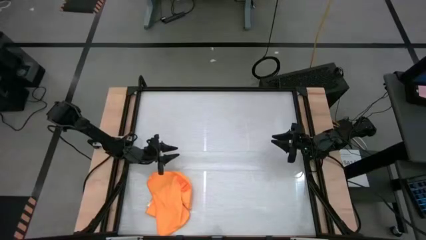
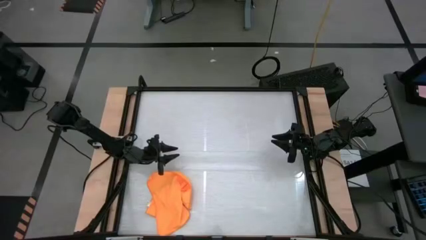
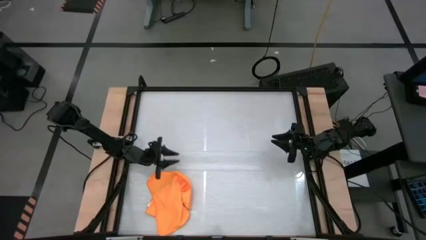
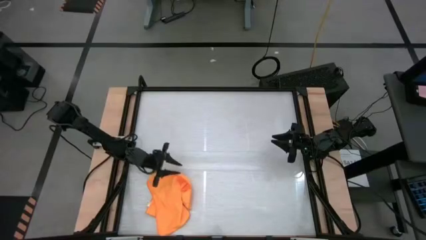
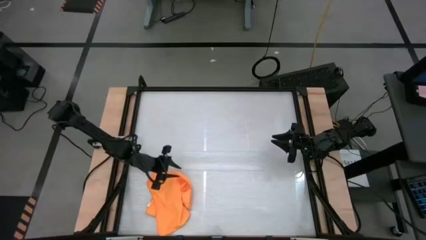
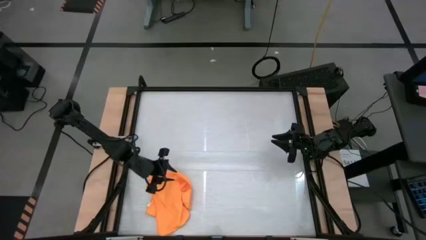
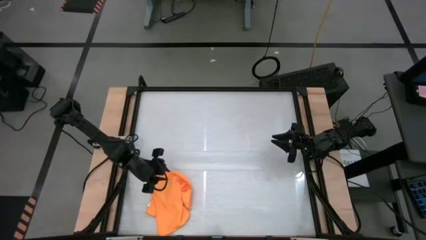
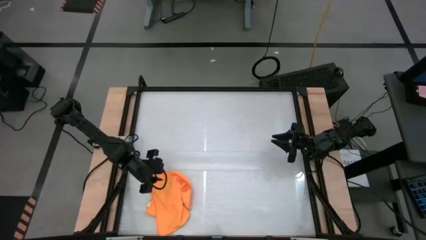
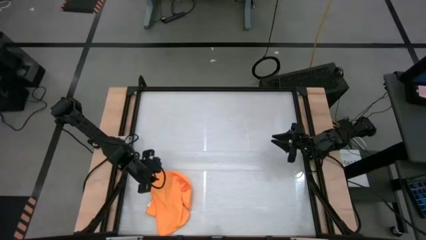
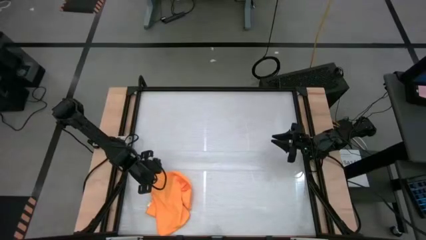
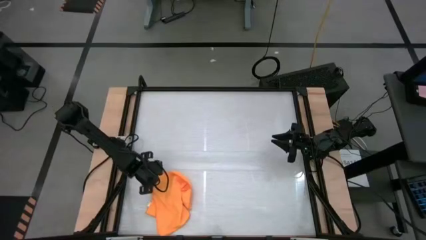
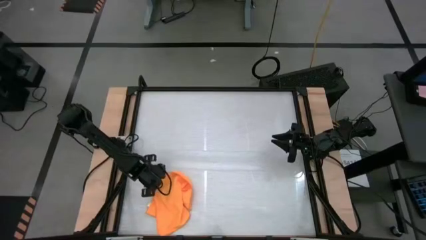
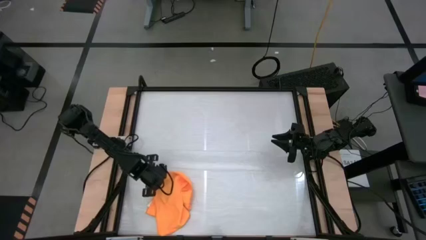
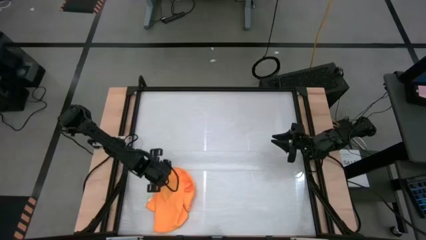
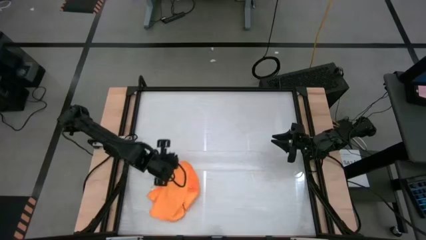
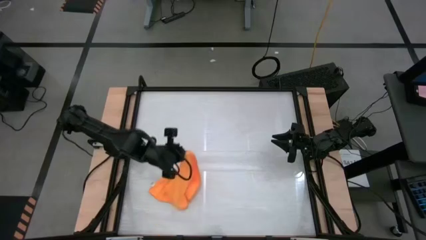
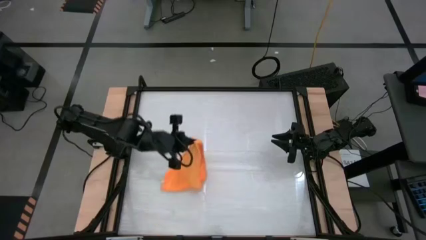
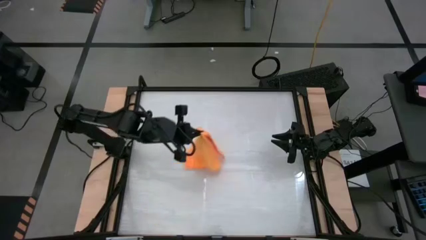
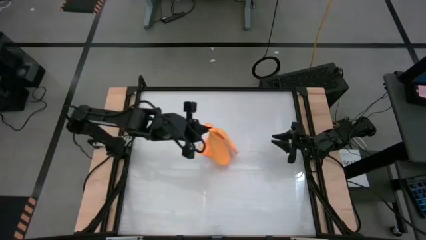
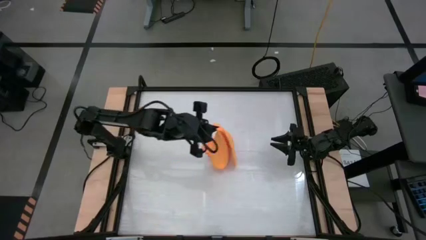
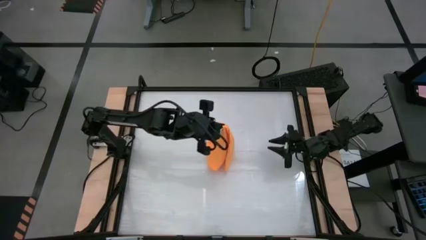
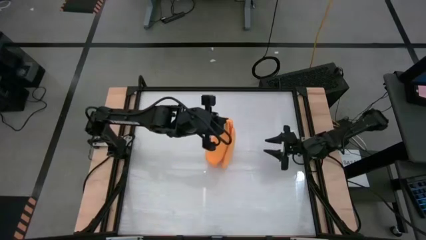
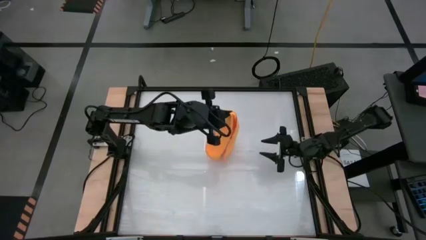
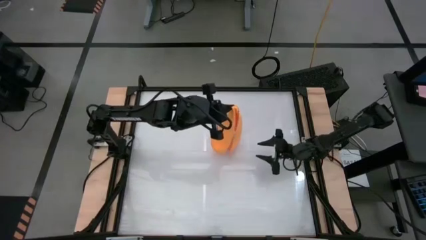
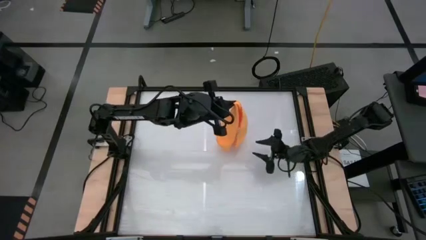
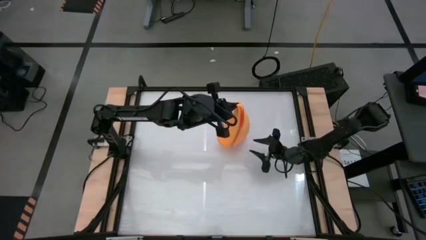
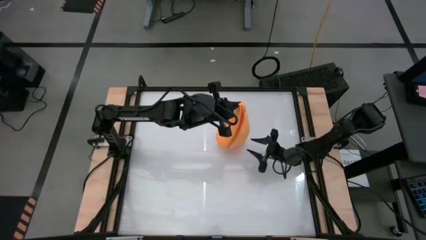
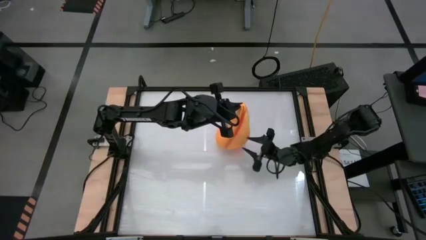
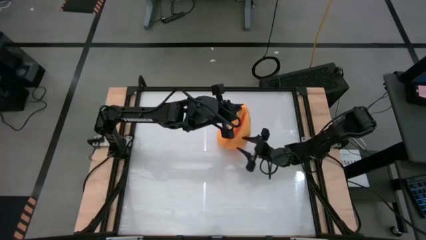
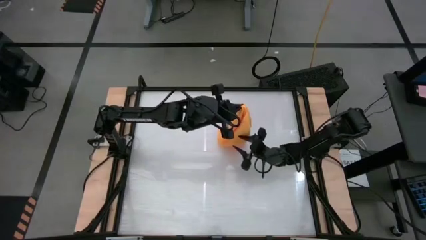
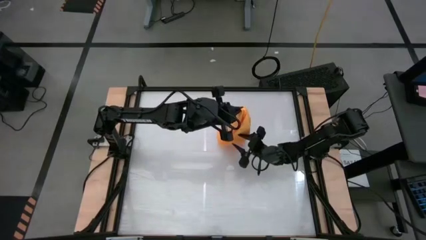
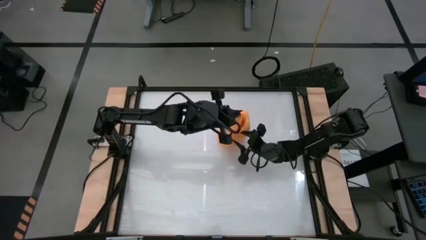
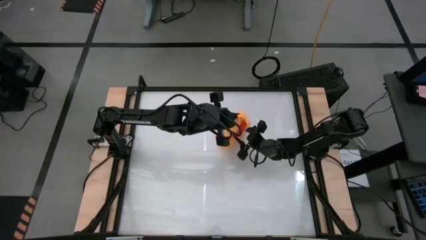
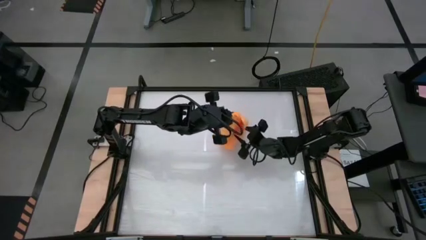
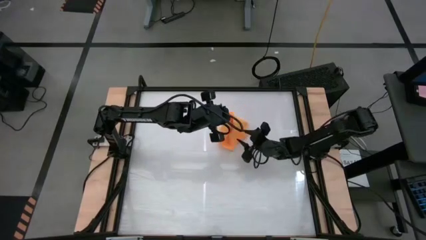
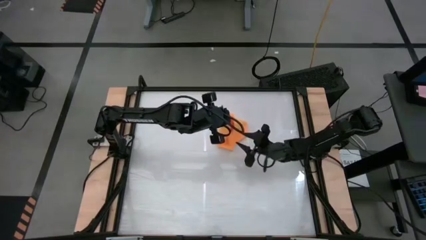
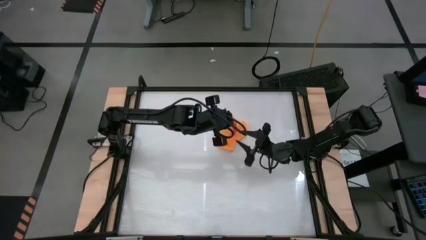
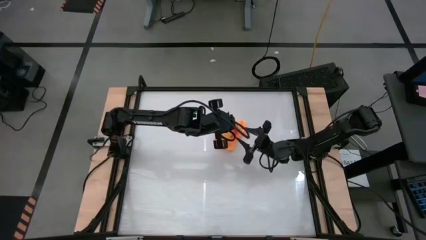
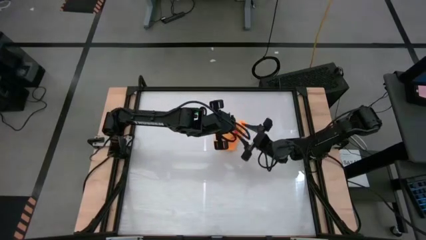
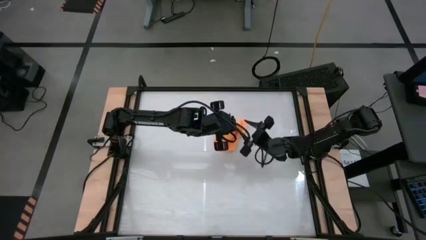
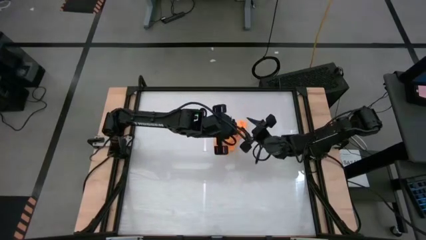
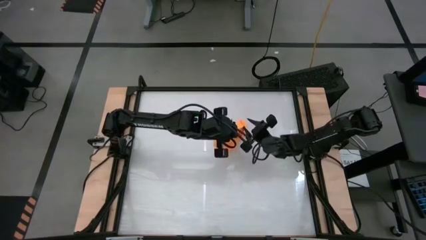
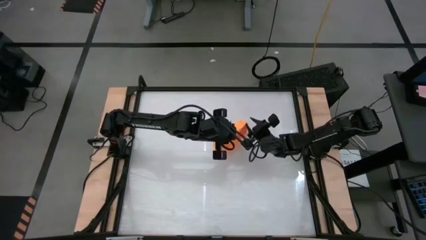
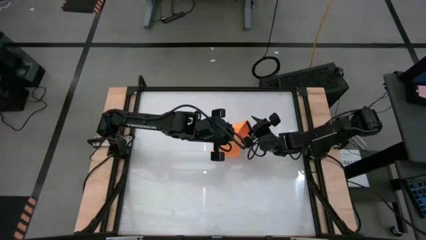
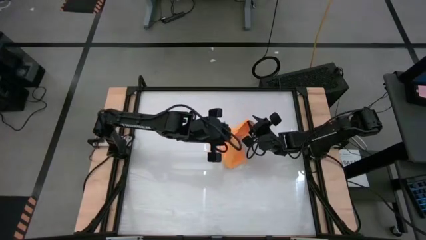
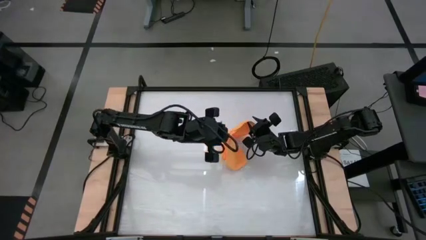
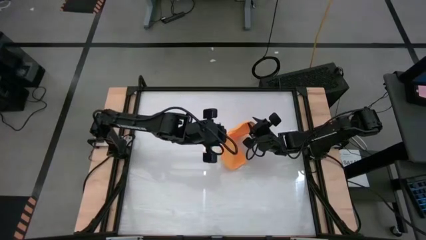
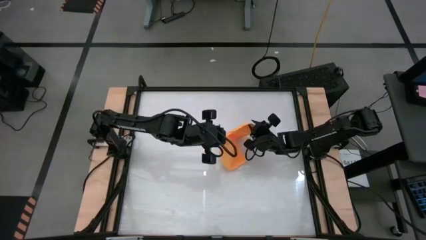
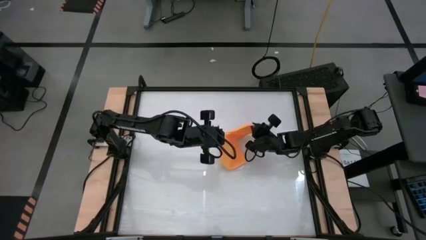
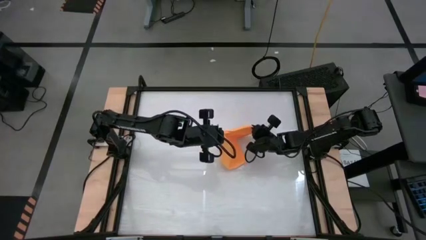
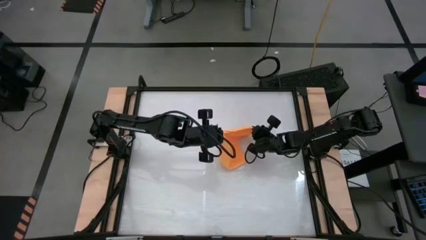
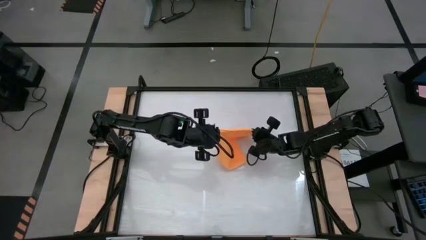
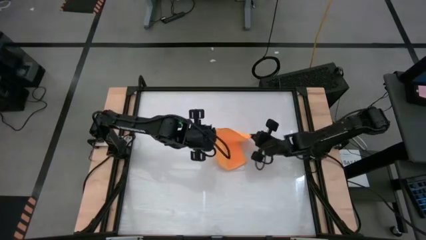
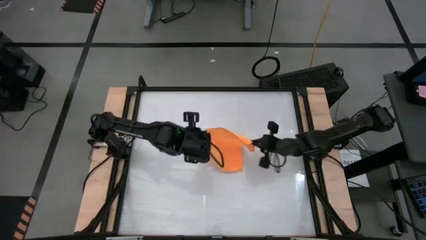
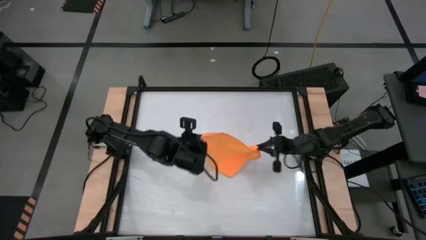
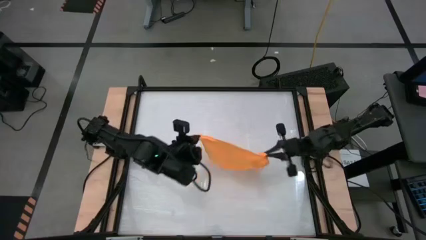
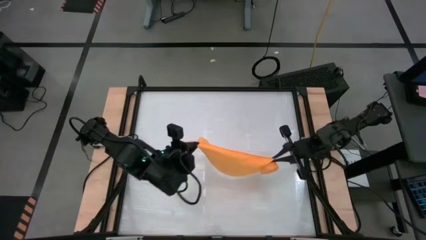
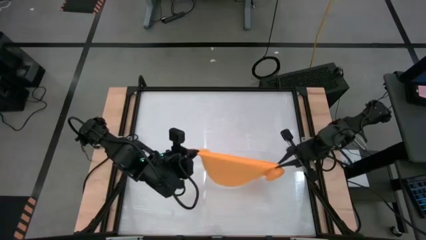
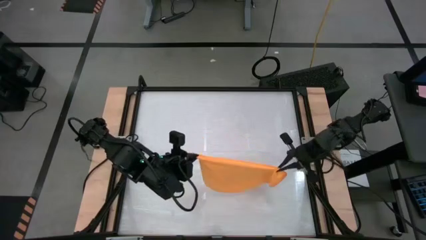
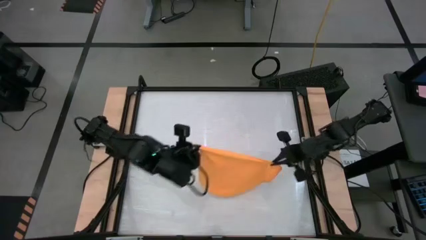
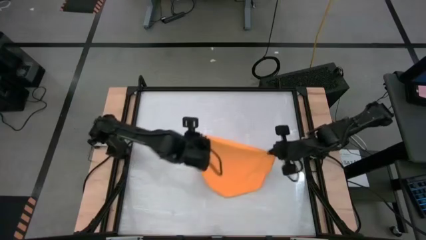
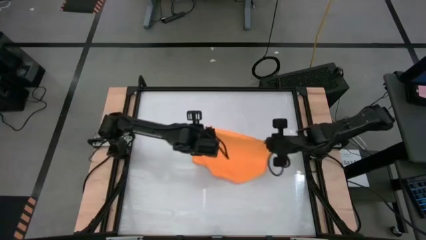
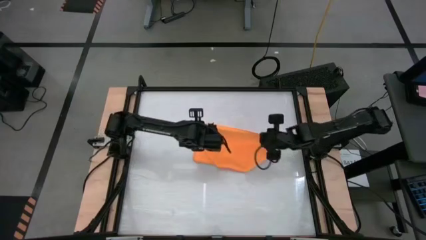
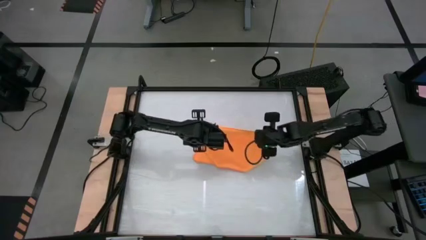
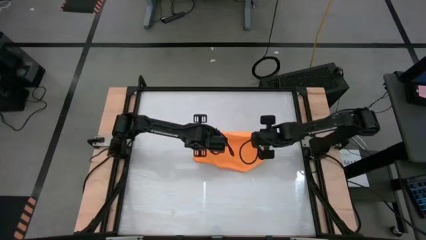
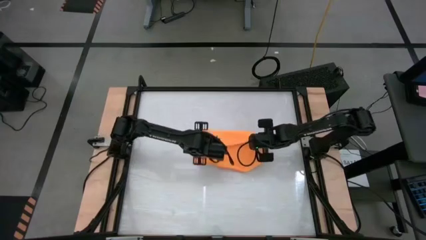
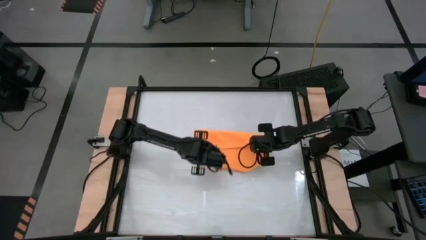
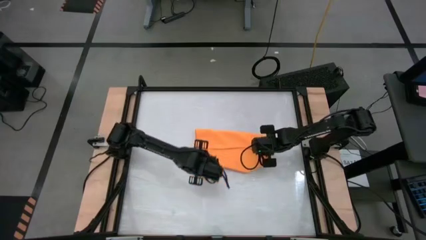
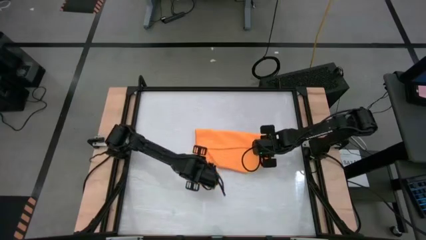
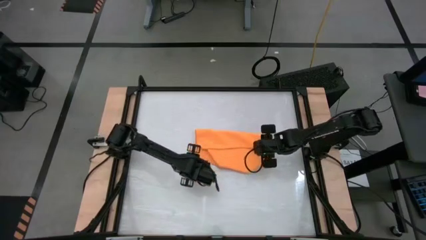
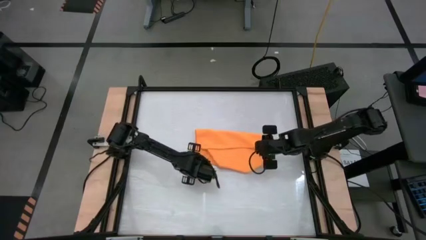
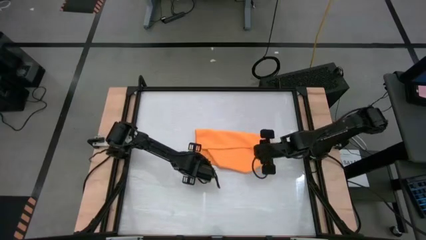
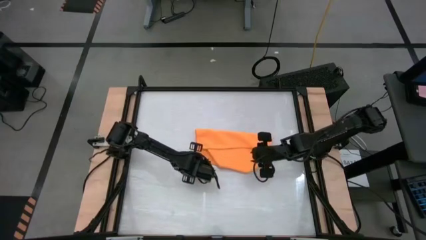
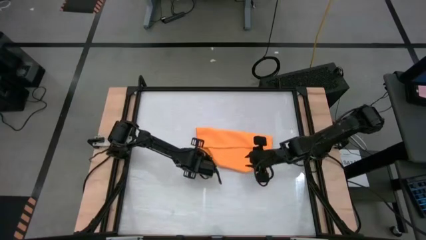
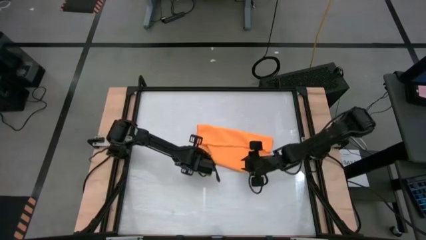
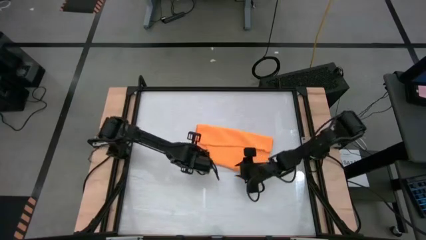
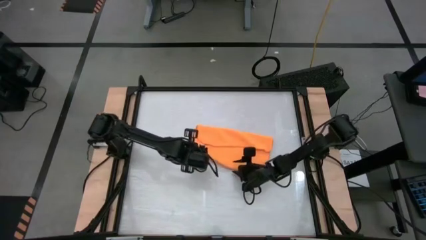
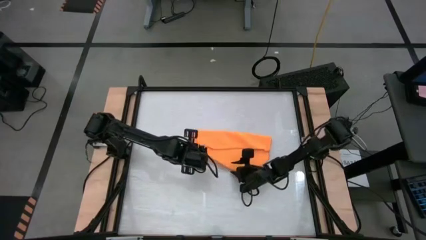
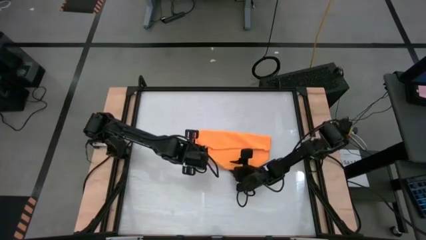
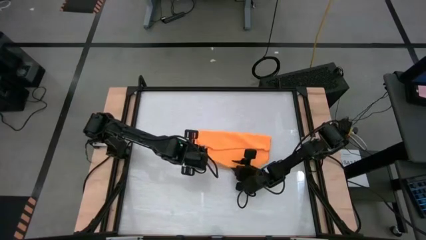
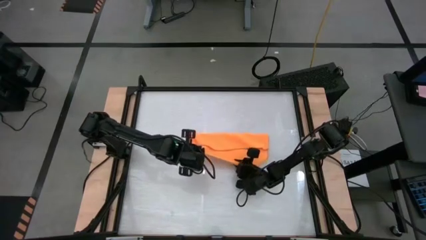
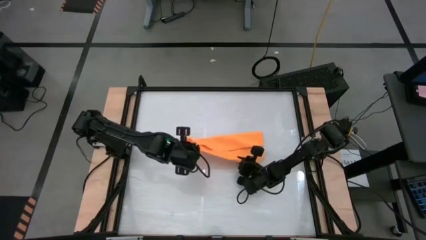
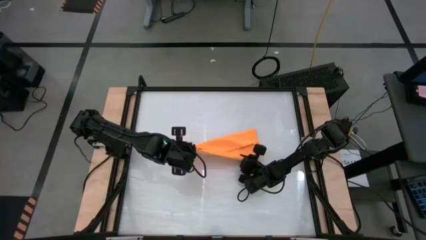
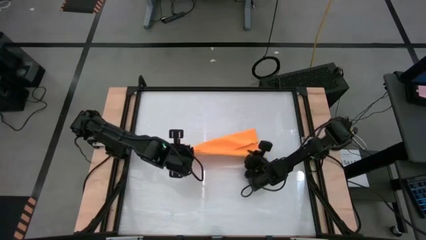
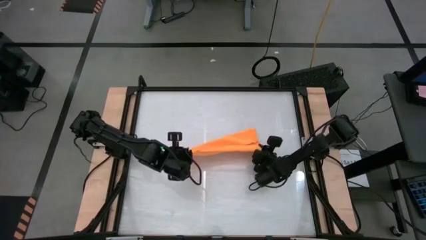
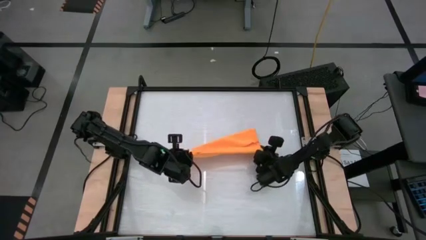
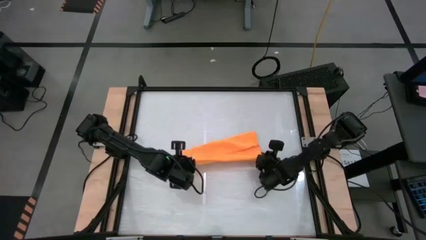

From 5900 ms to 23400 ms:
Task: Roll towel
Fold the orange towel
